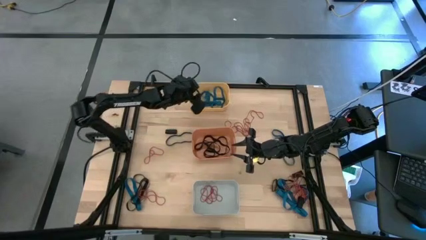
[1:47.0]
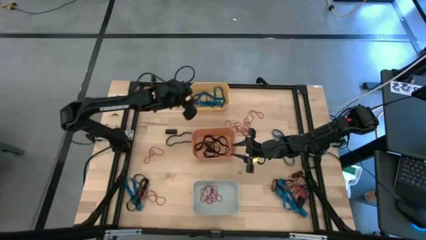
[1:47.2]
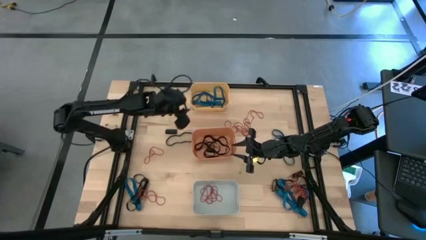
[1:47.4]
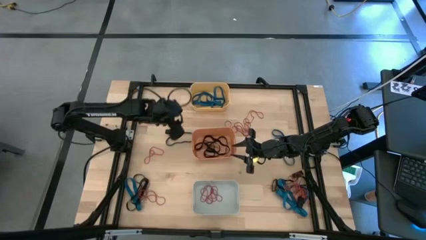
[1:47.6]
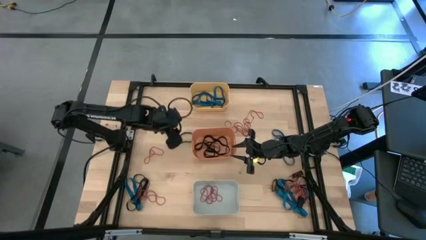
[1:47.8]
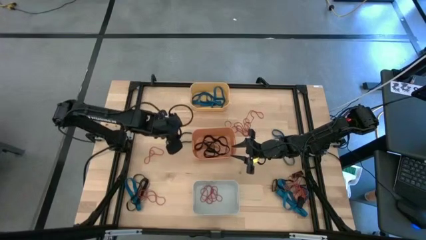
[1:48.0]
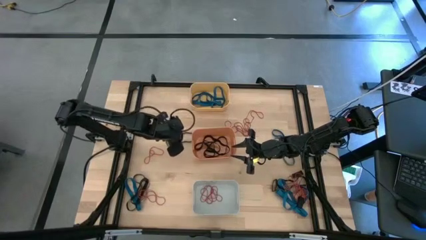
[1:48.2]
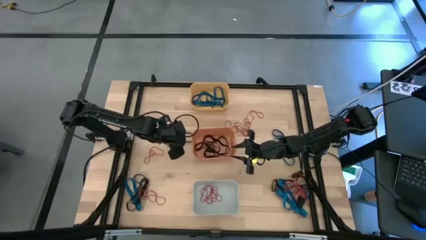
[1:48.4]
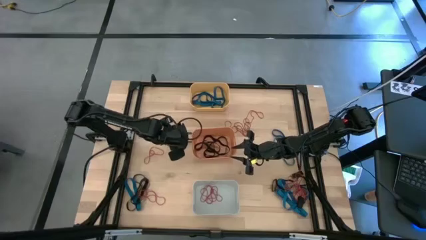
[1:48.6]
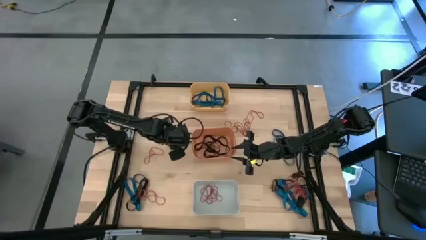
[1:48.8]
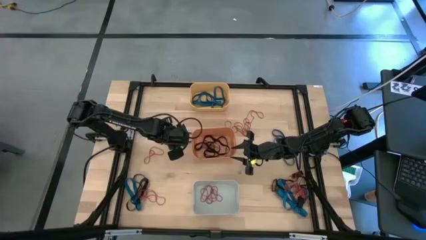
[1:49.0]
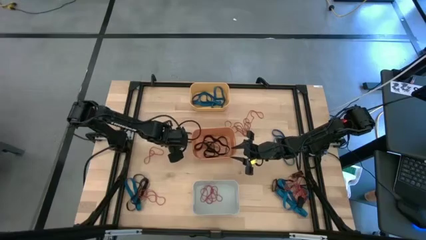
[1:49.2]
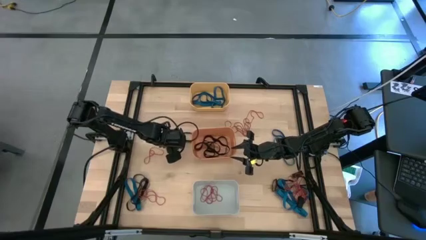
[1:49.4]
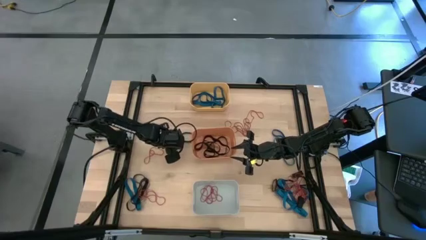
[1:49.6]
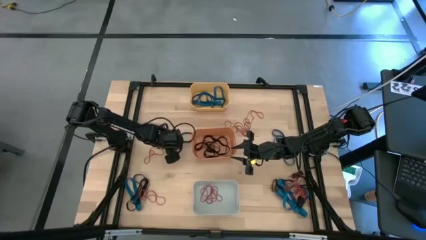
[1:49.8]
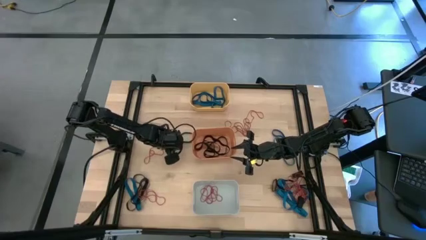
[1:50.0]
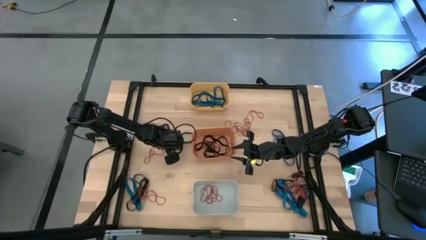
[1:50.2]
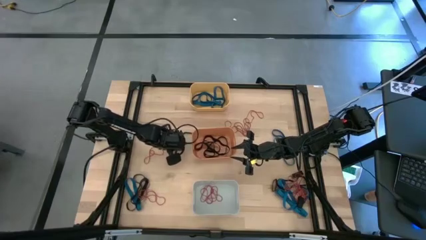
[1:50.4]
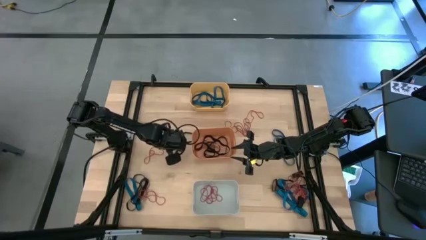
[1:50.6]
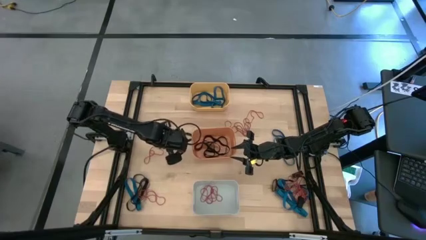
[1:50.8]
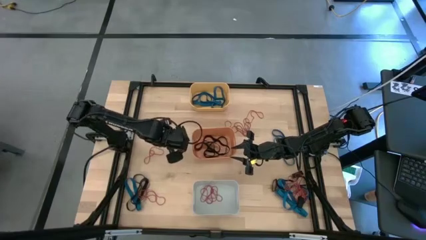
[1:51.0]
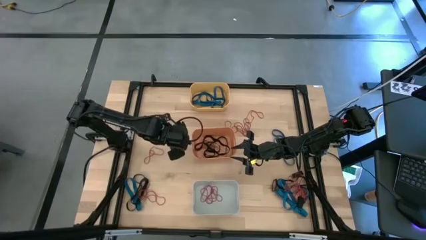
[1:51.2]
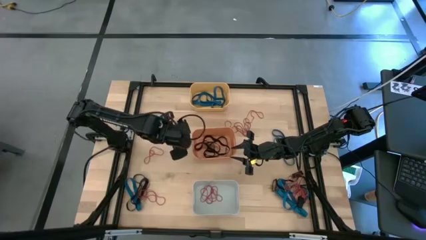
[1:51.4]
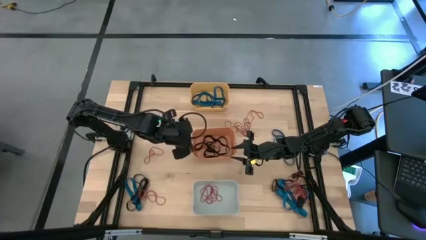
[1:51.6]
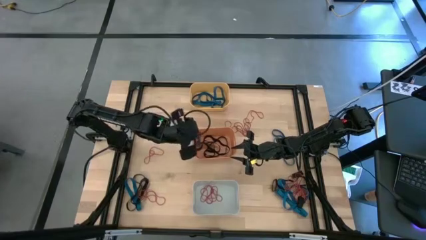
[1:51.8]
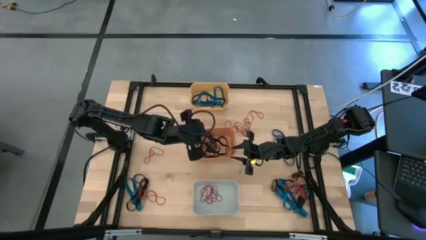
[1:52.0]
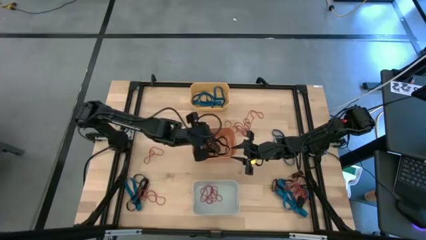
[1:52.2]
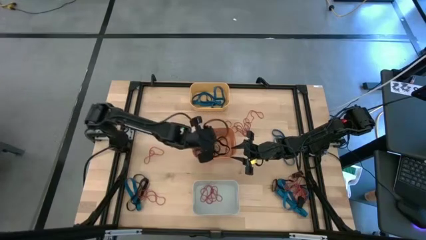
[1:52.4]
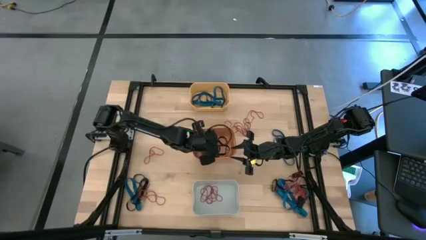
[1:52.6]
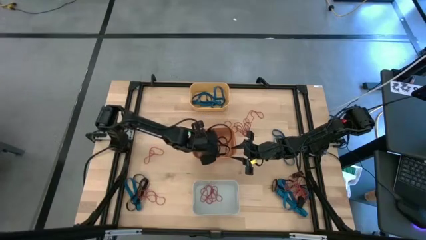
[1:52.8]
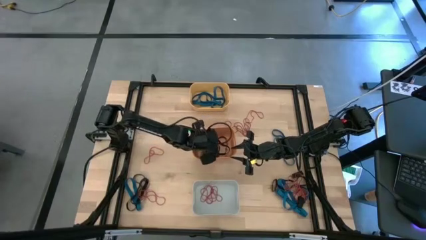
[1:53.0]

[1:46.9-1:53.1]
Task: Sort rubber bands into baskets
Put the black rubber band in the orange bin

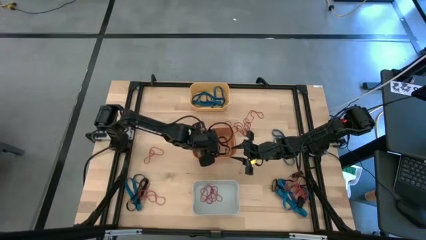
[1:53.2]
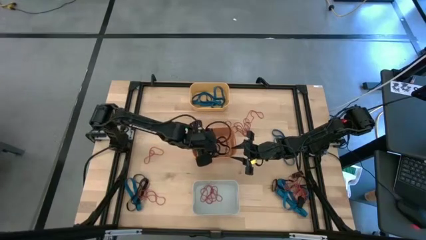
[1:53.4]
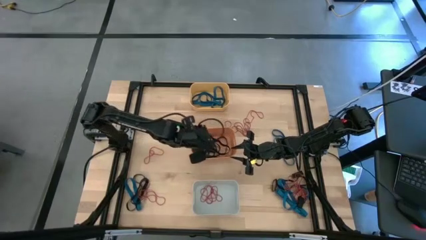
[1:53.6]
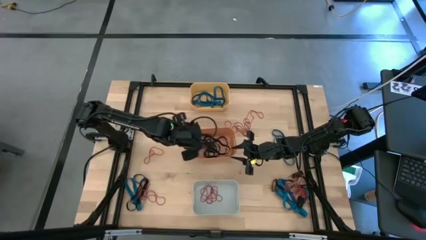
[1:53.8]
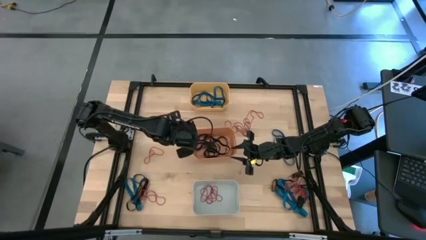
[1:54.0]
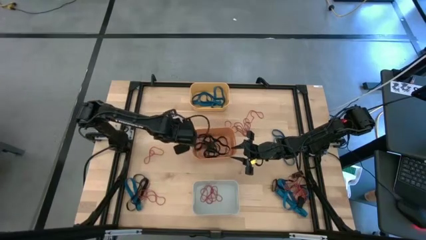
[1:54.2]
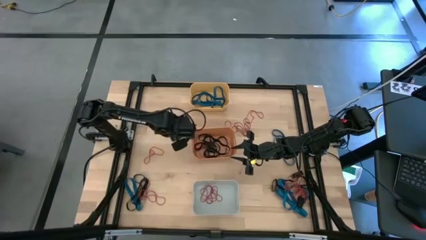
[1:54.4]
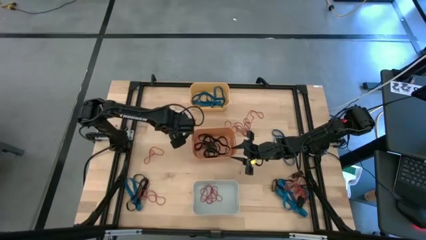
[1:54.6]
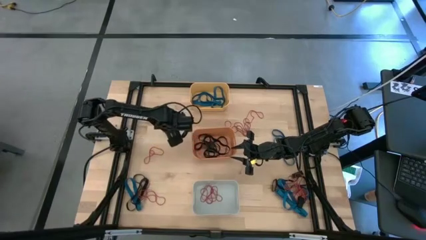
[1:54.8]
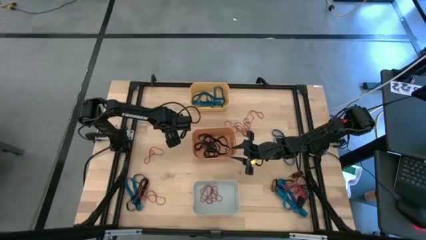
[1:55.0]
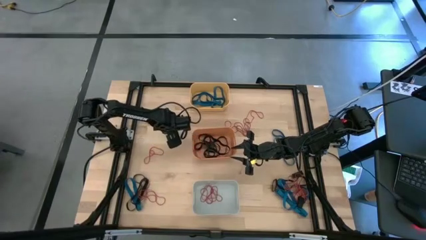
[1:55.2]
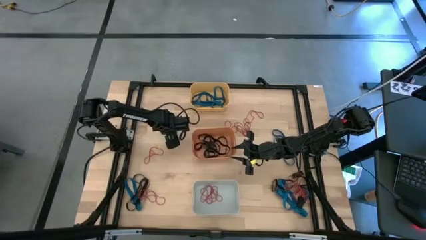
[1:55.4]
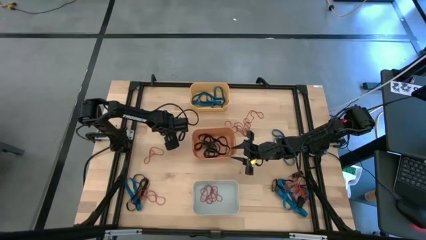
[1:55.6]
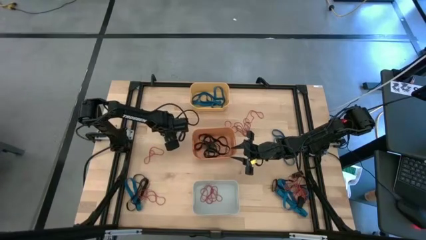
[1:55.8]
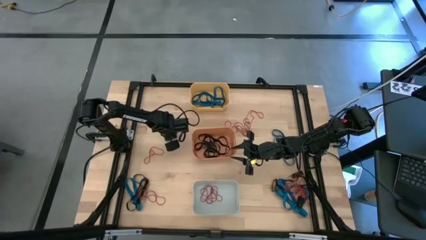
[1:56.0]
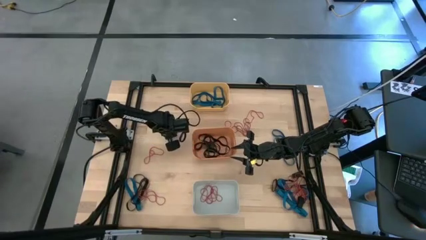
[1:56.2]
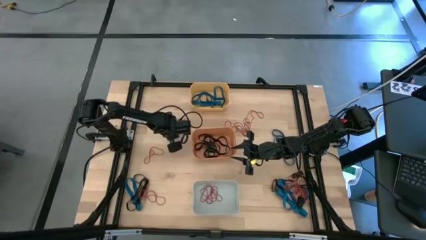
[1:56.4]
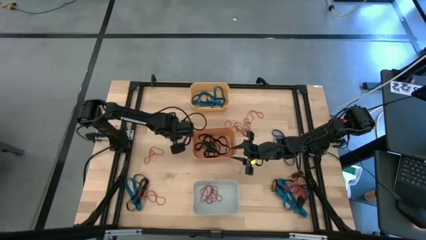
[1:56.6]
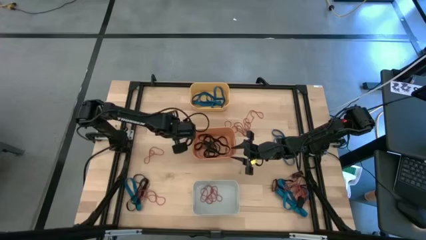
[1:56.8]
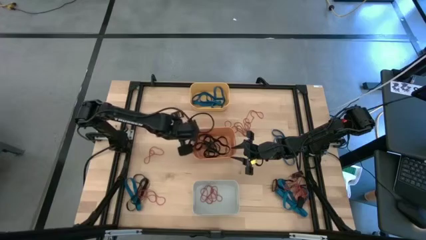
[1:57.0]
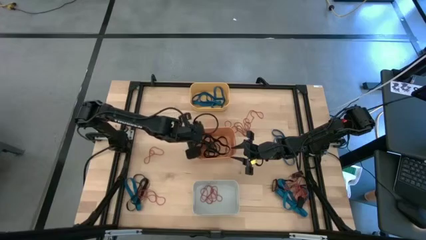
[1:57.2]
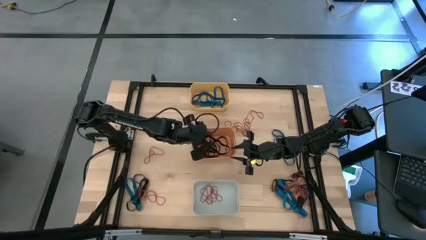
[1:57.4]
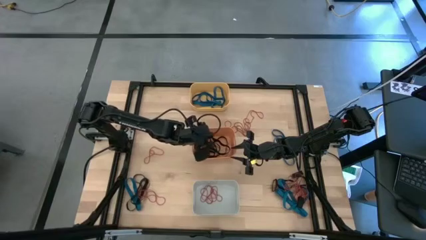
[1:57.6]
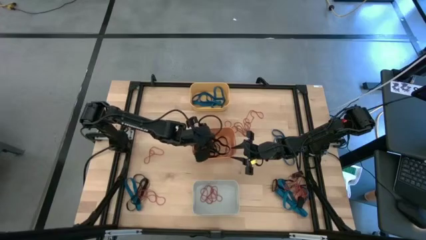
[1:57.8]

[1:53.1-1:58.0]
Put the black rubber band in the orange bin

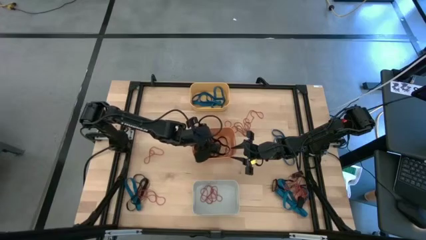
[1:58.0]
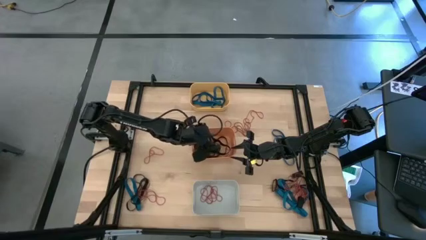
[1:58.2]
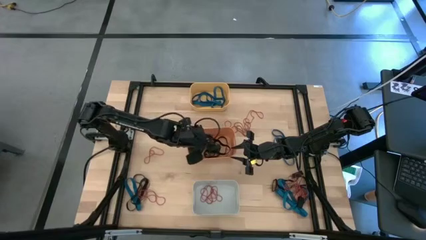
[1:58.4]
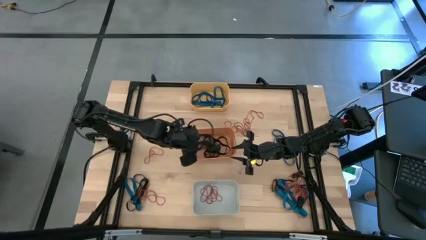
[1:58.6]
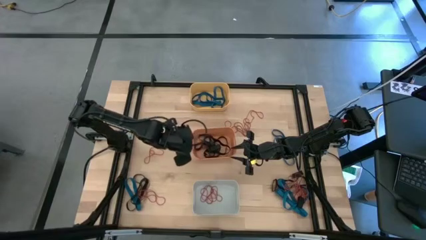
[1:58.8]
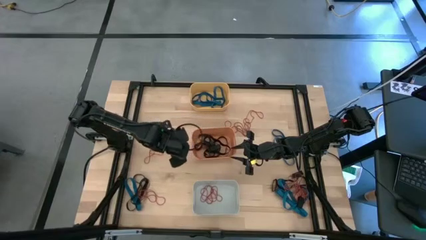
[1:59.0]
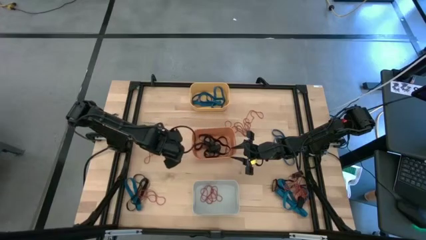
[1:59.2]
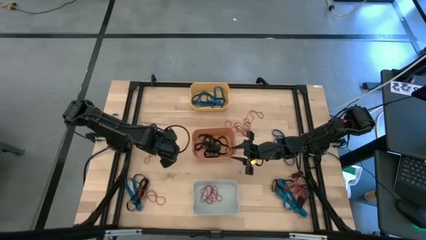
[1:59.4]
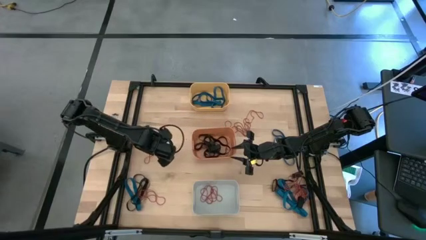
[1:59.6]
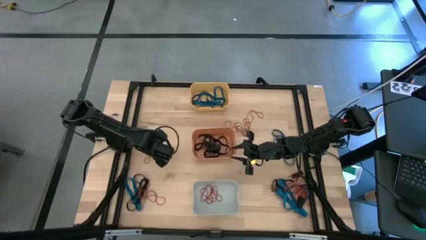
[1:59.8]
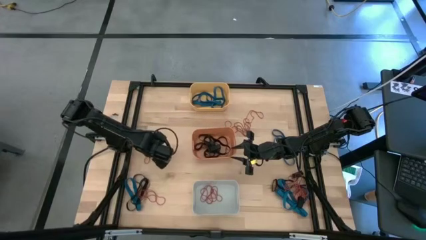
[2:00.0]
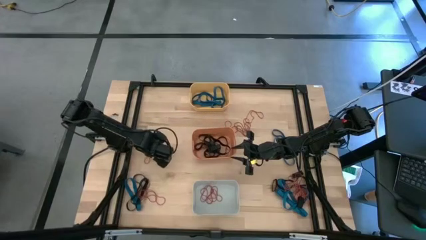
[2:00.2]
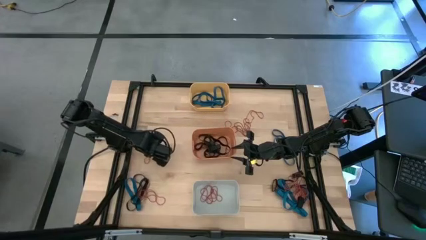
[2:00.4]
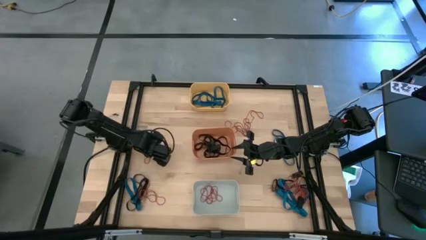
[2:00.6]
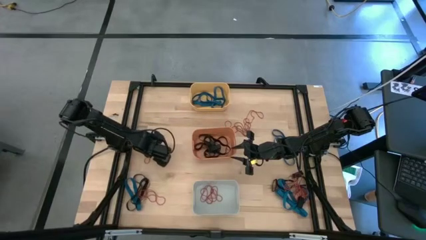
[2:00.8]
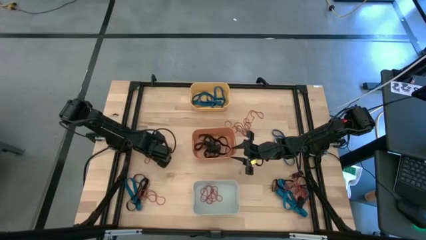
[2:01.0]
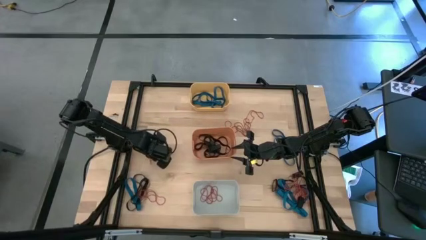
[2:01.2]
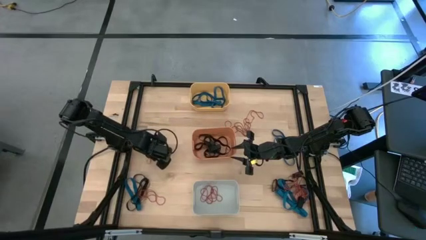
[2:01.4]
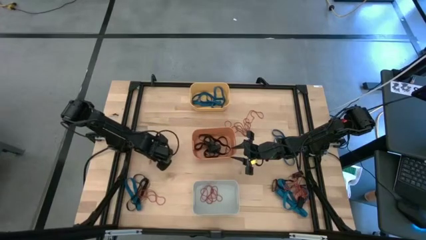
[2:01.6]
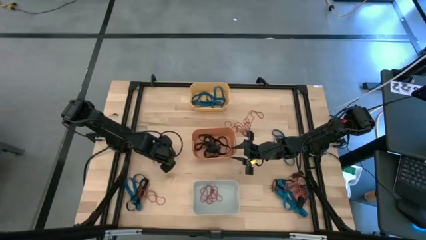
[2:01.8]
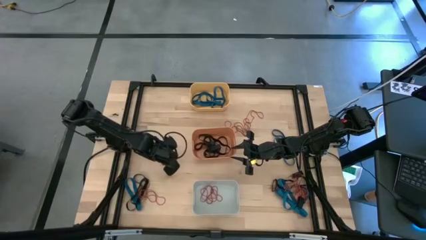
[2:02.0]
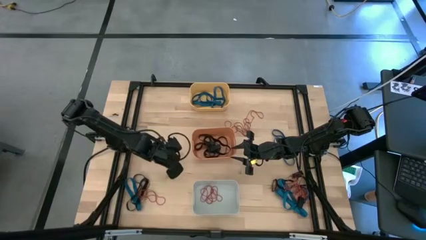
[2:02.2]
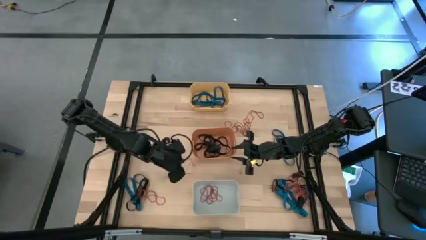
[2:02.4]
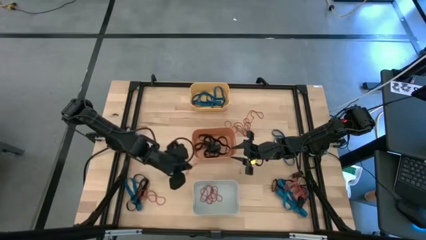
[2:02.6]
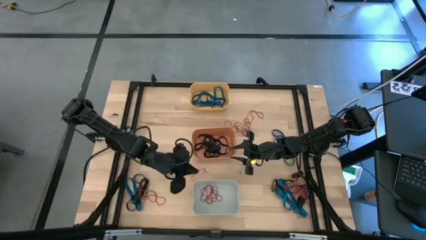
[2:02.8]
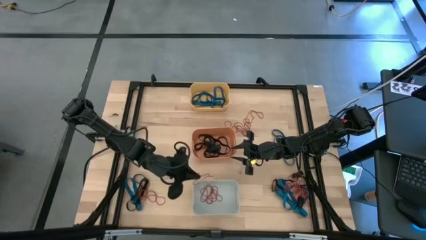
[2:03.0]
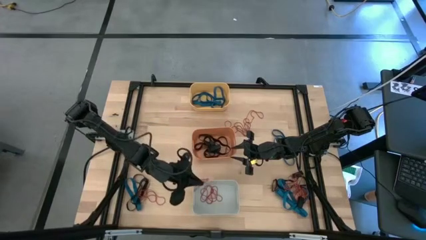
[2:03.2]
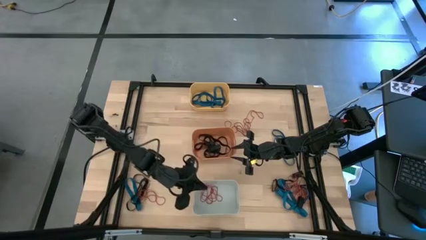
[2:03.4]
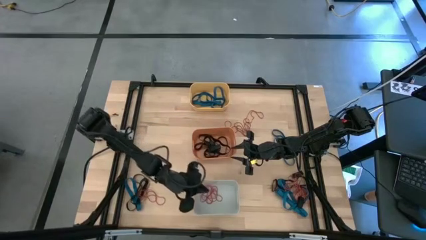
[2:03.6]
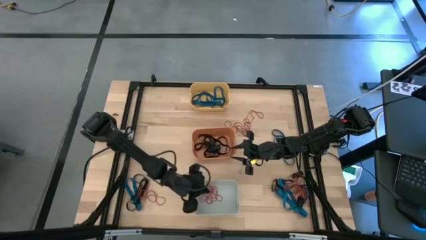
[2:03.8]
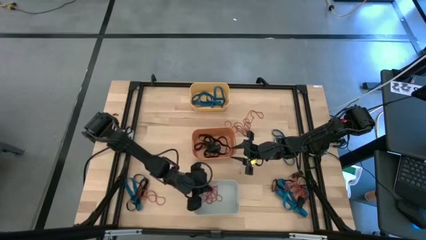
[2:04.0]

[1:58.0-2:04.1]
Put the red rubber band in the white bin
